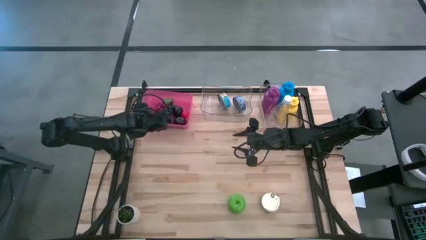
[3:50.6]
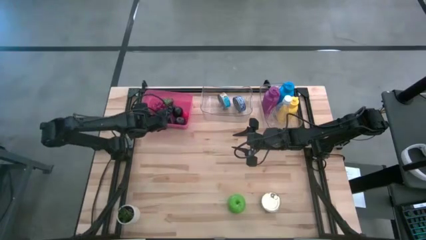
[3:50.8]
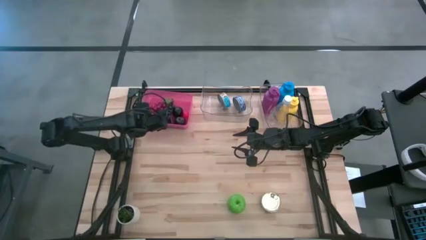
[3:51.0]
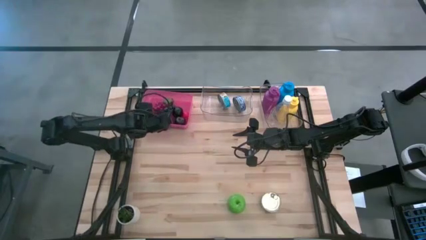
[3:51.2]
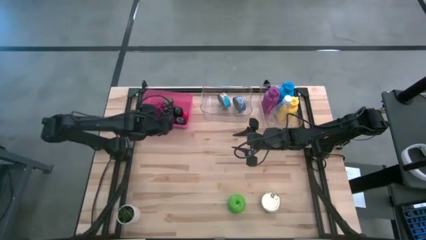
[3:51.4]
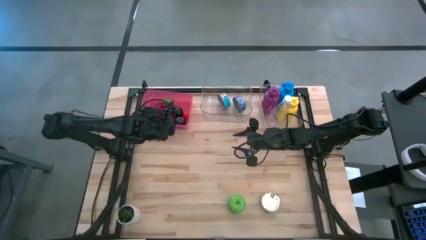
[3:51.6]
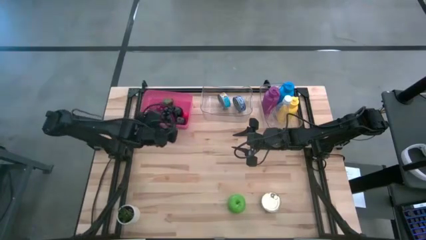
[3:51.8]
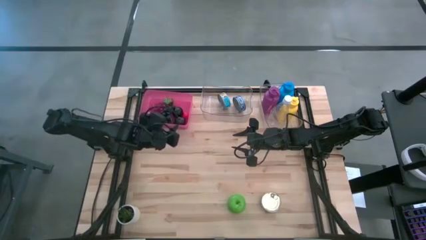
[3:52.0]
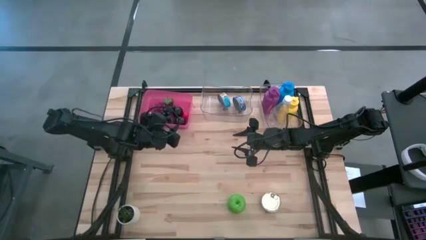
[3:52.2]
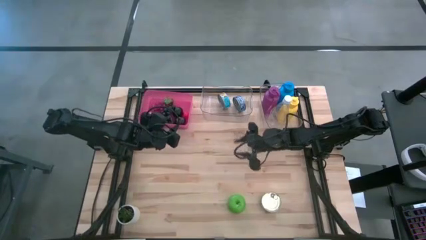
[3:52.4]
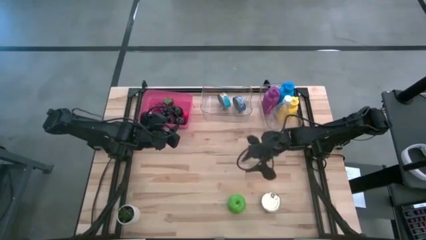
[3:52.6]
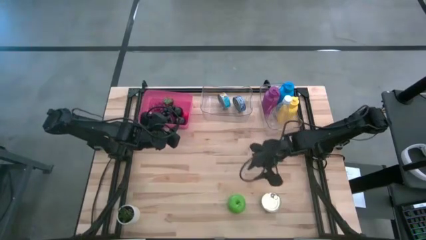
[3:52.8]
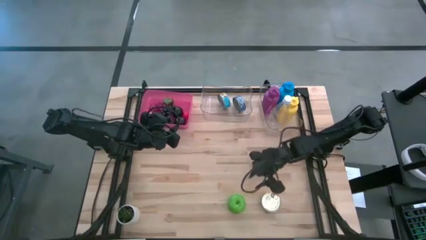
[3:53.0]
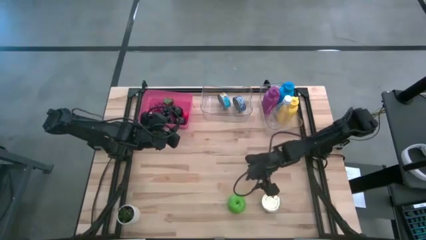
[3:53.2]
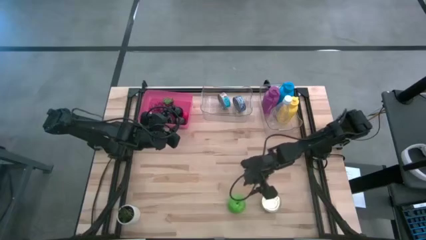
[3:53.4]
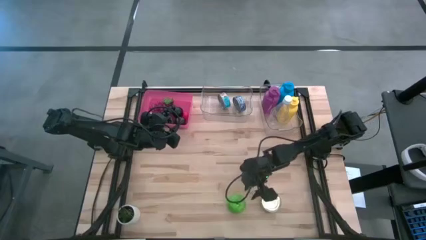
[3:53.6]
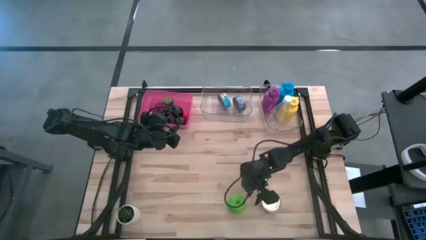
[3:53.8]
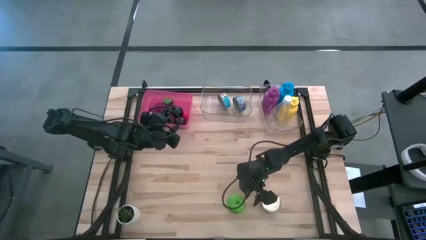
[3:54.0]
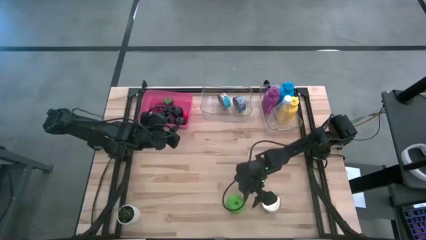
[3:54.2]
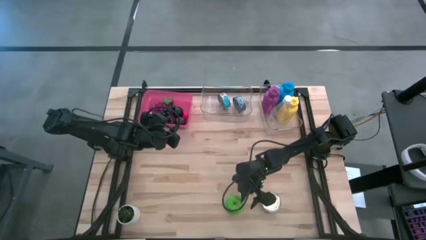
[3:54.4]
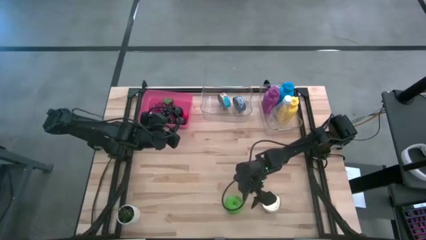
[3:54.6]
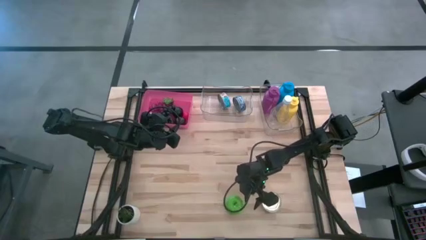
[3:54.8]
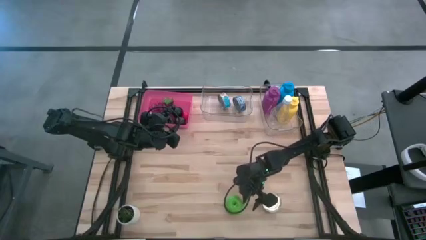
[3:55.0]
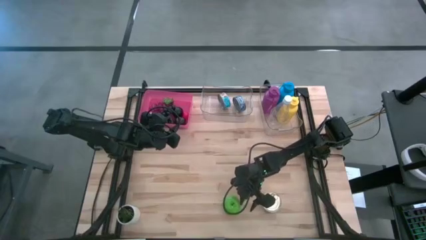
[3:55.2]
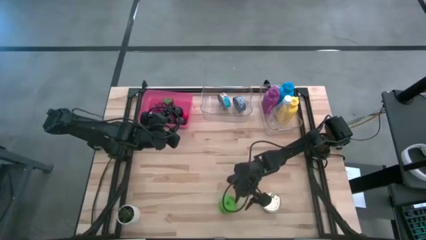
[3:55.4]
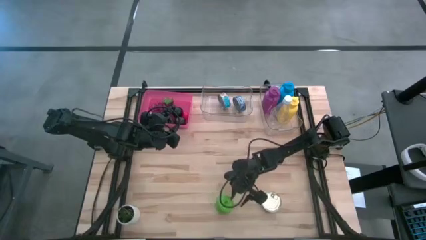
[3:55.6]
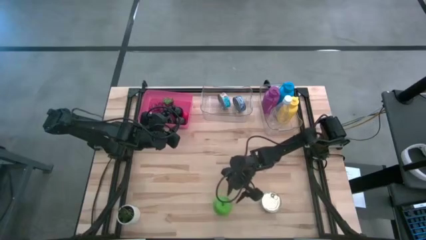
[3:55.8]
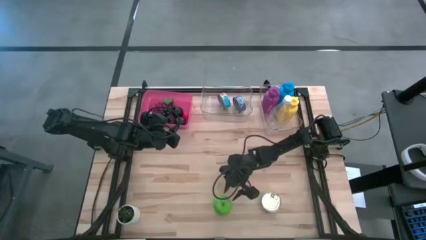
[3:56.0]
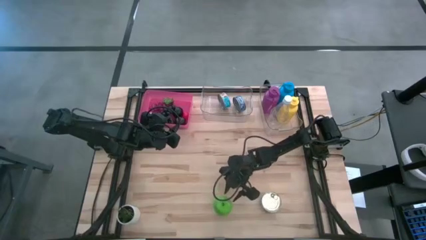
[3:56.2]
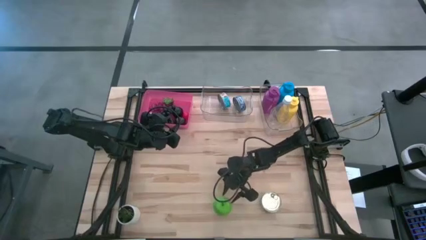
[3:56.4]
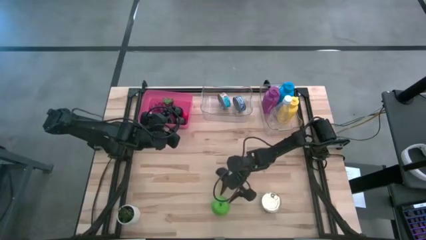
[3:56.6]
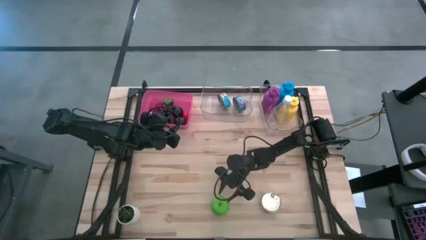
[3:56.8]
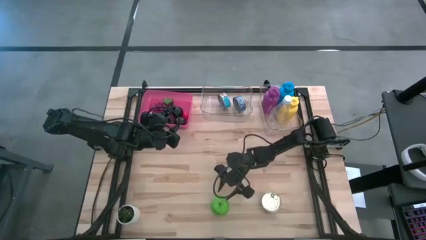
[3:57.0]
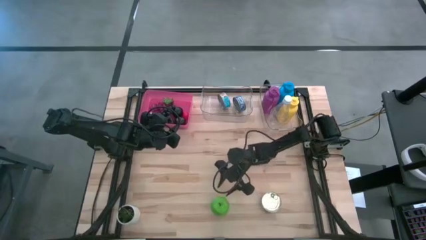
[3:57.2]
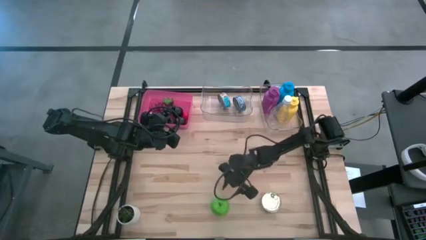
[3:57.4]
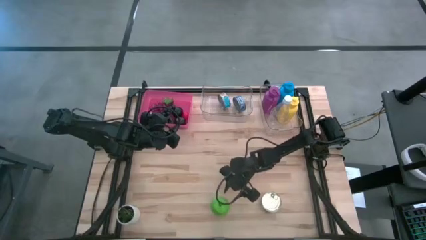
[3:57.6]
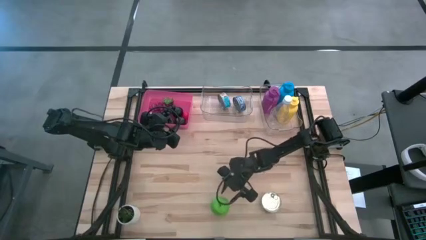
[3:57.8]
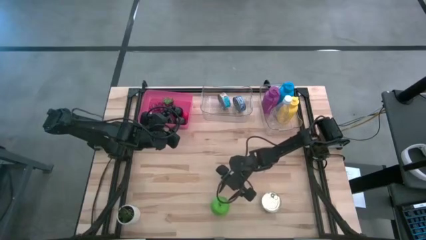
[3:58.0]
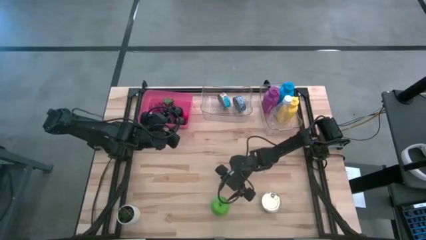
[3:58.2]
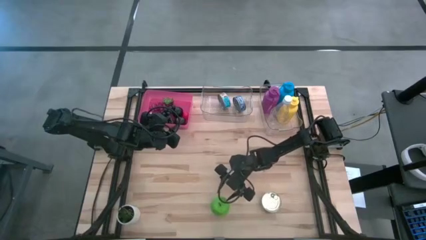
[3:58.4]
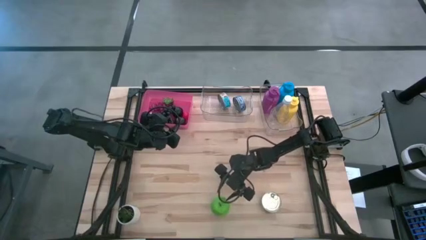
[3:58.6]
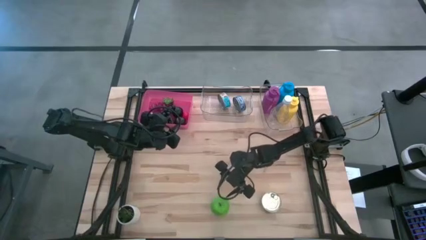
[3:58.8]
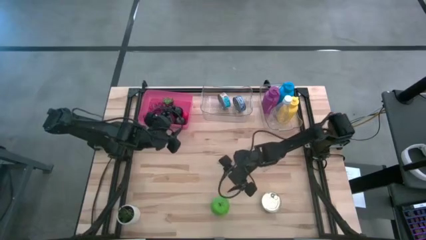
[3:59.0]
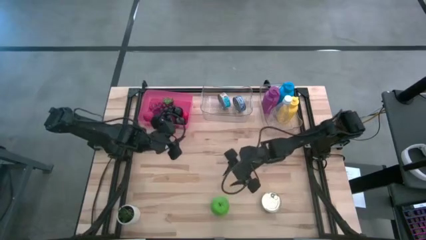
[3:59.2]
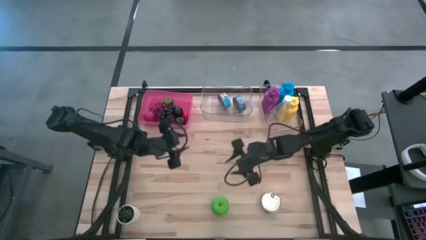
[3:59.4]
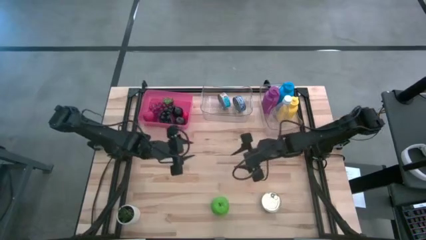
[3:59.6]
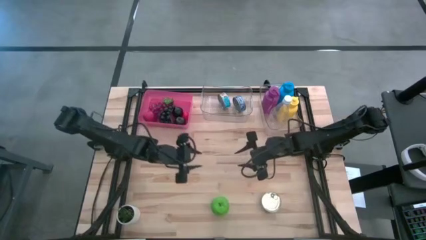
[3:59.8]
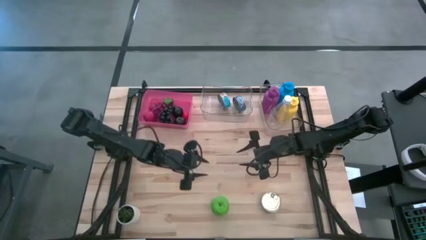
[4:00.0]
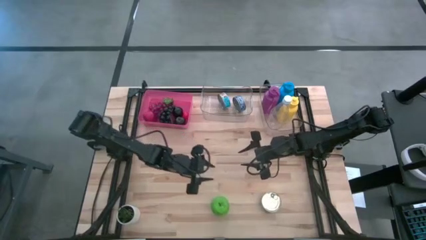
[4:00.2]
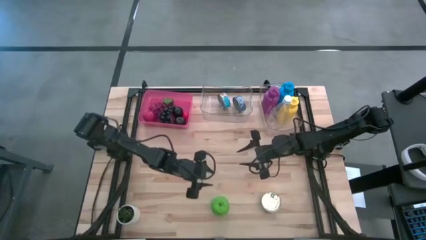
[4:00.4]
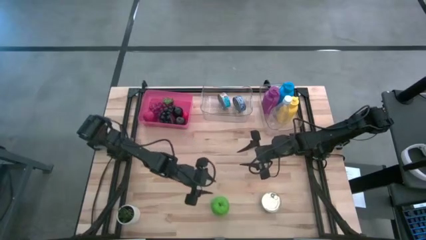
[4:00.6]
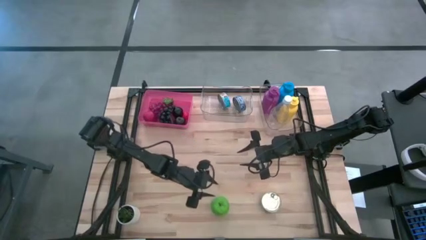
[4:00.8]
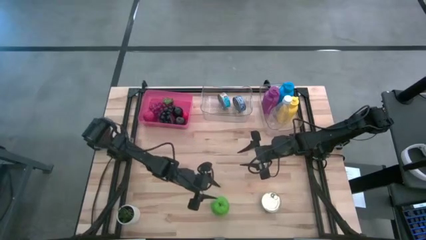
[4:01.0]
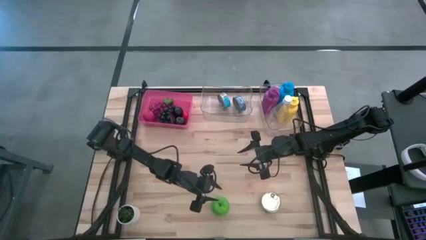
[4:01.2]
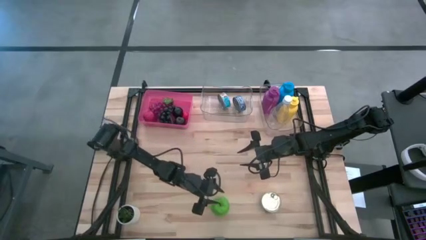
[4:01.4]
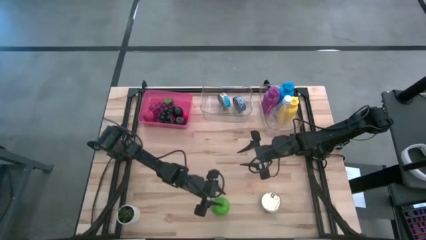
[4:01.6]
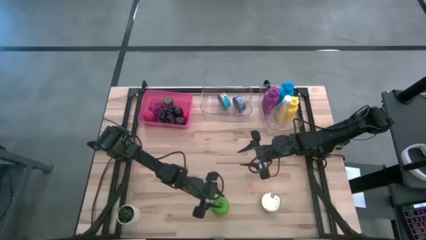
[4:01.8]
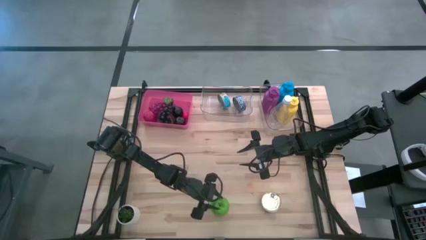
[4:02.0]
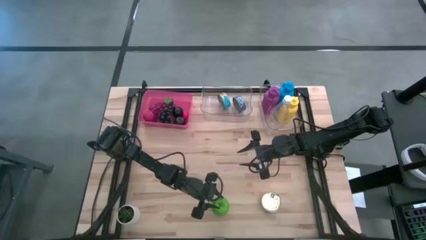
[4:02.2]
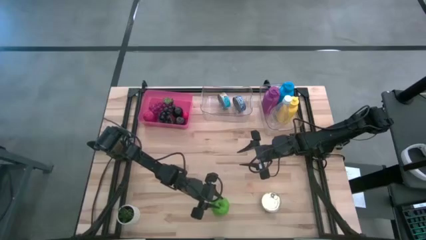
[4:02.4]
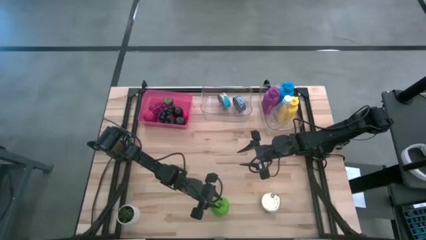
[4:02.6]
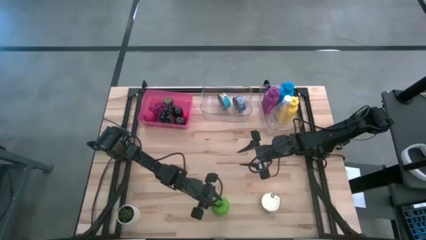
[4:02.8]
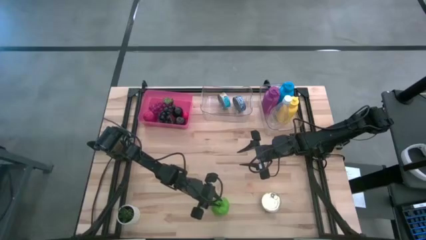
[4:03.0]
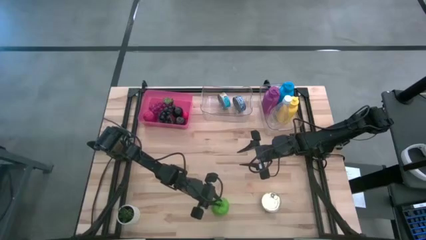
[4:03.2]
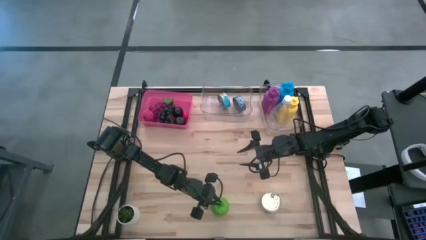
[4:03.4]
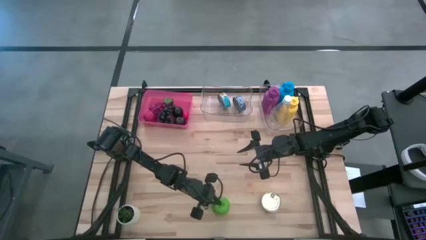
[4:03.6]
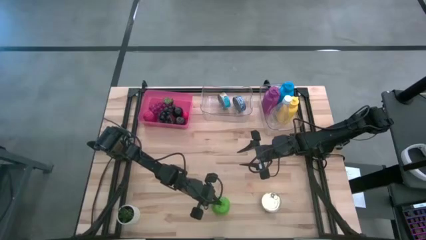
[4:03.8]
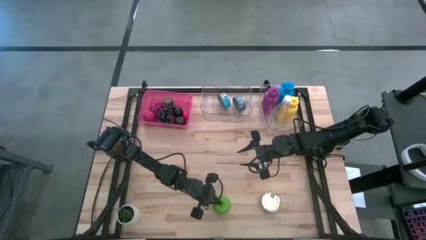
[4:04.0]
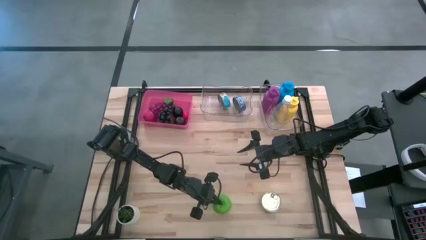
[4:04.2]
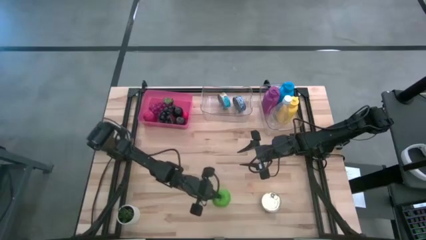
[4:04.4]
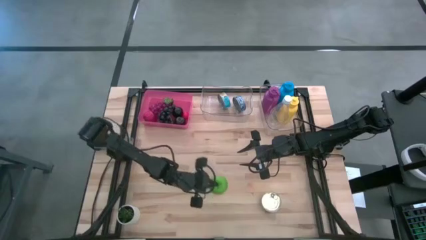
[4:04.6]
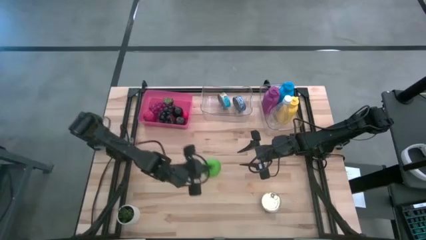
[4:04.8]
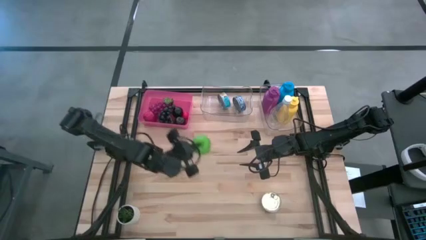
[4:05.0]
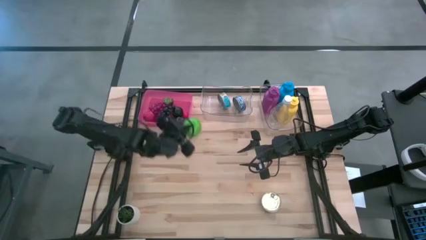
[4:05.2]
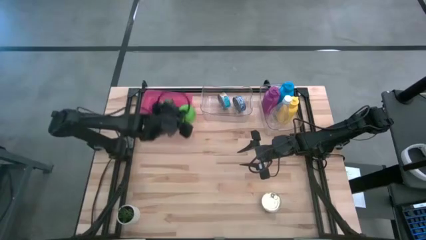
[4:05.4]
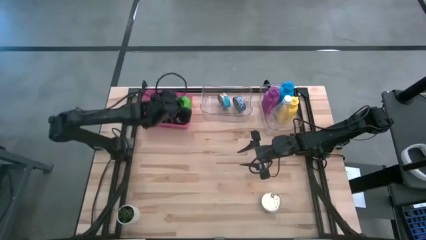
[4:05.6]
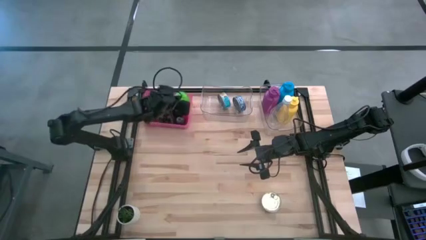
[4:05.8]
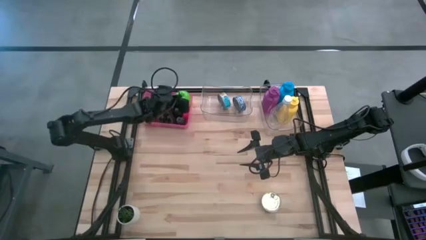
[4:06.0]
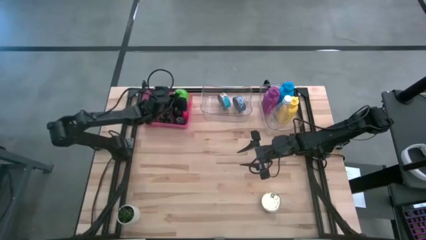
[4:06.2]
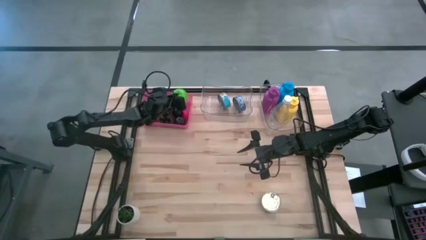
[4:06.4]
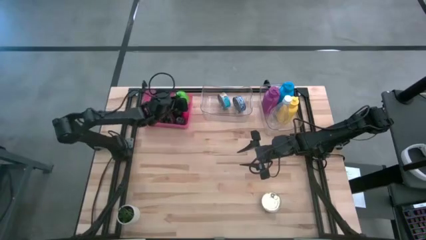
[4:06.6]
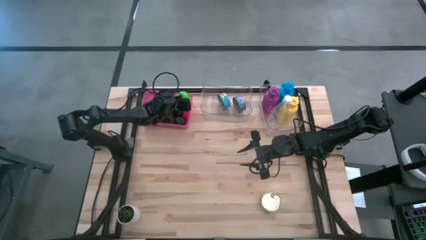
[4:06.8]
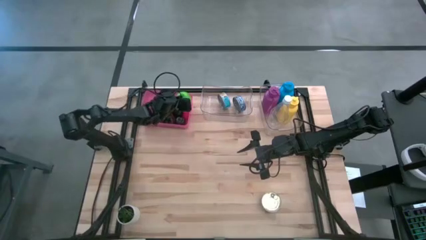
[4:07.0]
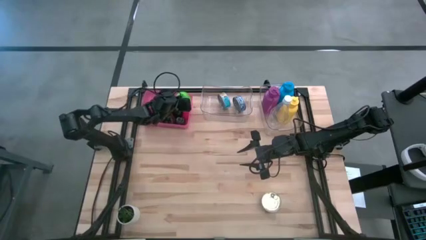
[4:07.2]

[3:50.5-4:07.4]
Task: Pick & Place Food Item
Put the green apple into the pink bin
